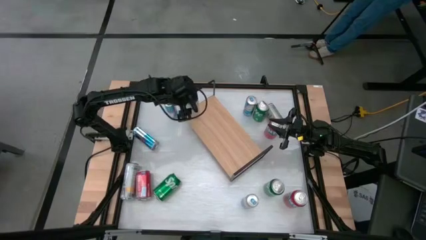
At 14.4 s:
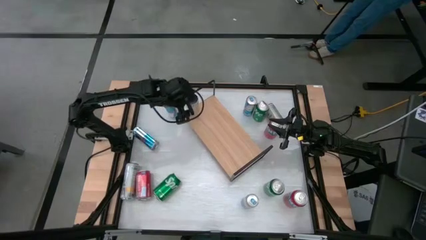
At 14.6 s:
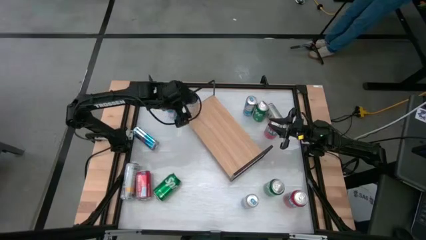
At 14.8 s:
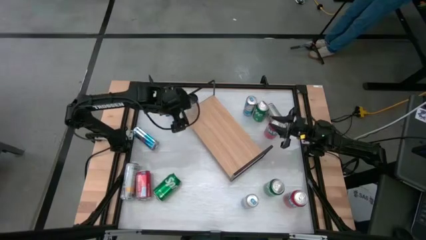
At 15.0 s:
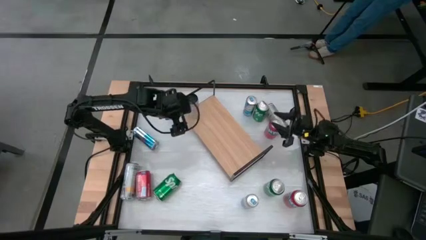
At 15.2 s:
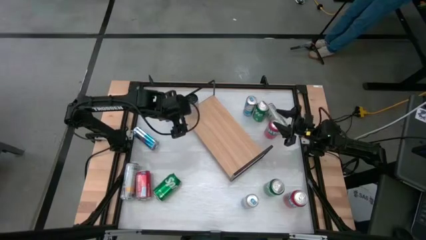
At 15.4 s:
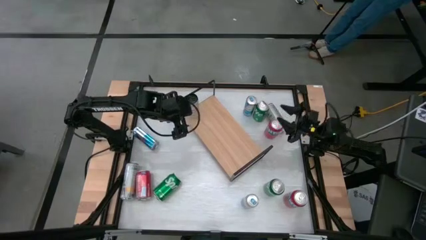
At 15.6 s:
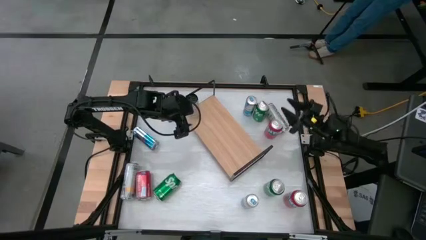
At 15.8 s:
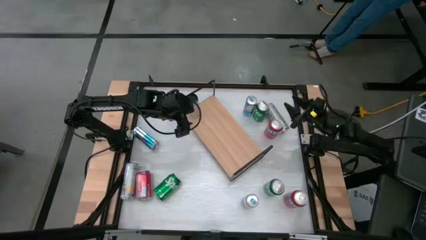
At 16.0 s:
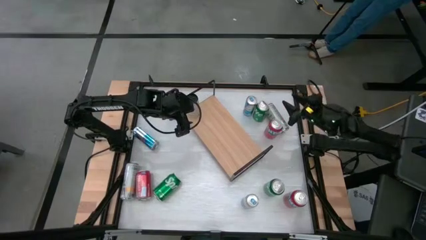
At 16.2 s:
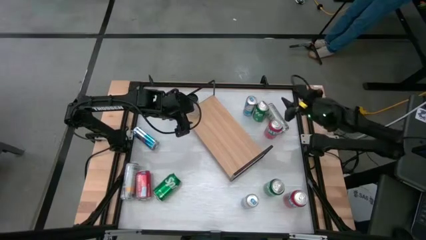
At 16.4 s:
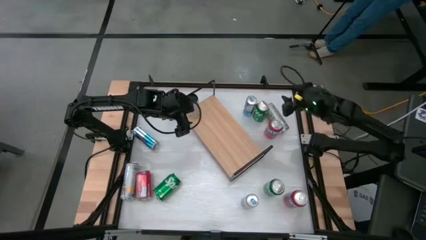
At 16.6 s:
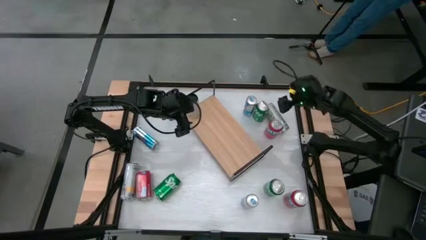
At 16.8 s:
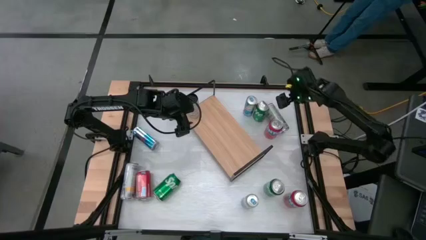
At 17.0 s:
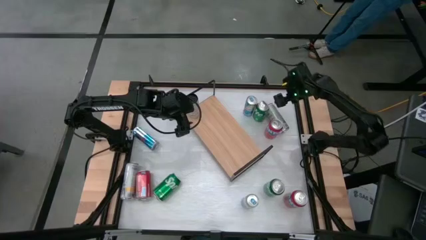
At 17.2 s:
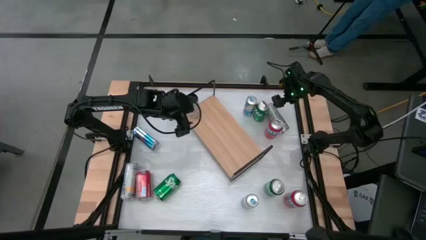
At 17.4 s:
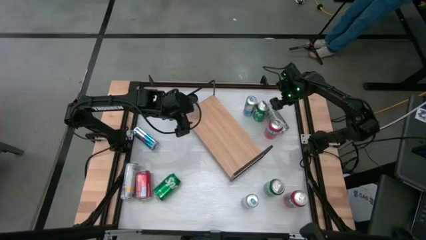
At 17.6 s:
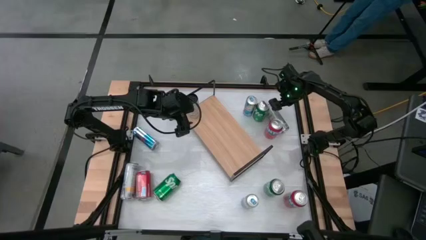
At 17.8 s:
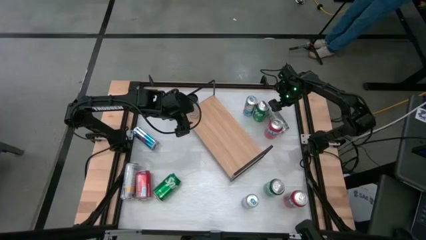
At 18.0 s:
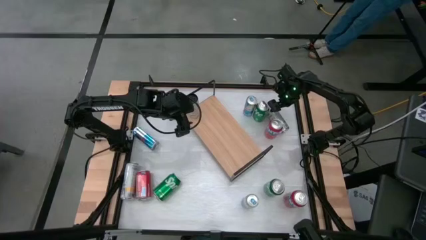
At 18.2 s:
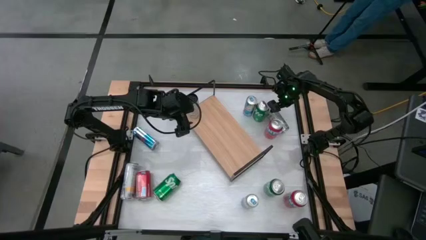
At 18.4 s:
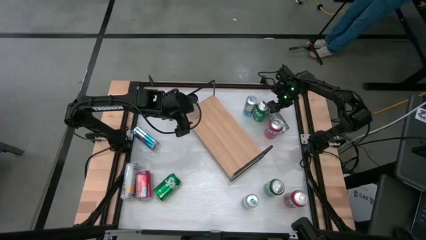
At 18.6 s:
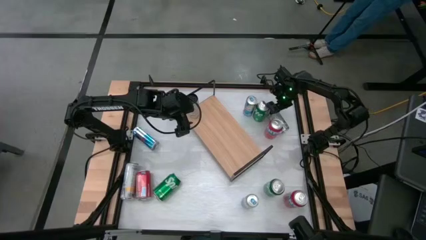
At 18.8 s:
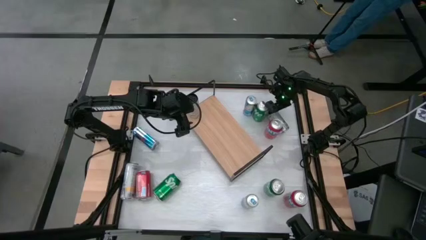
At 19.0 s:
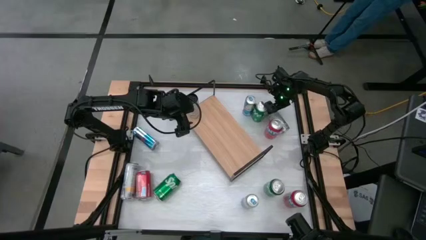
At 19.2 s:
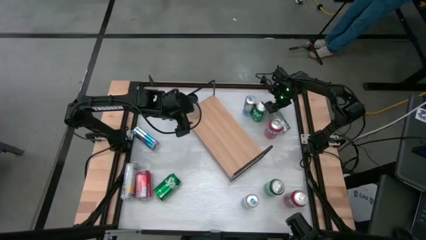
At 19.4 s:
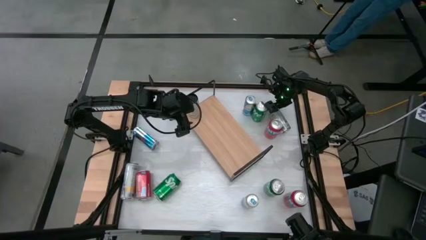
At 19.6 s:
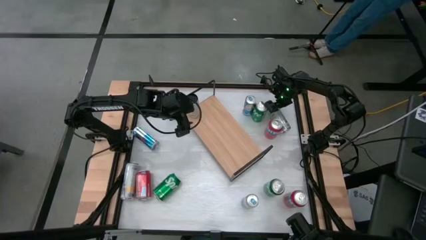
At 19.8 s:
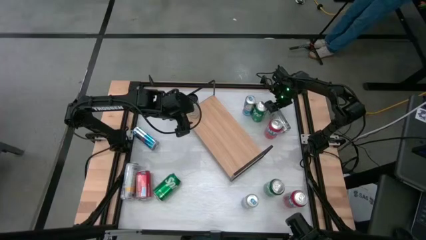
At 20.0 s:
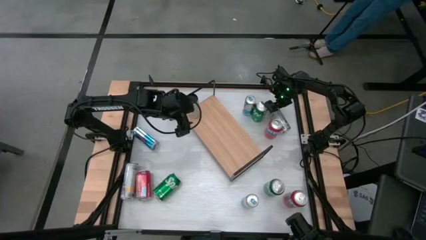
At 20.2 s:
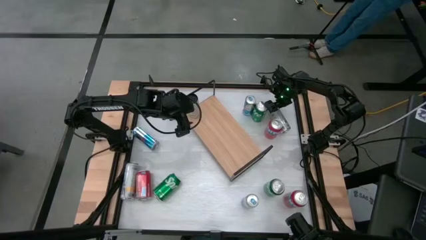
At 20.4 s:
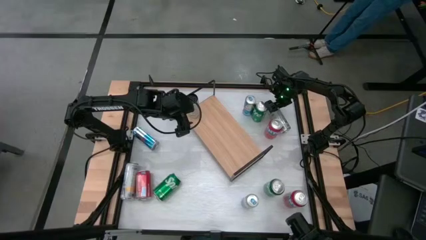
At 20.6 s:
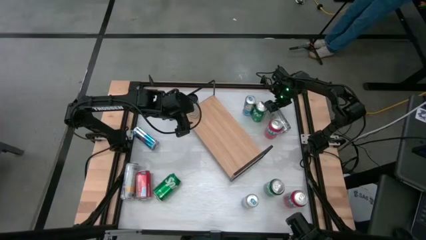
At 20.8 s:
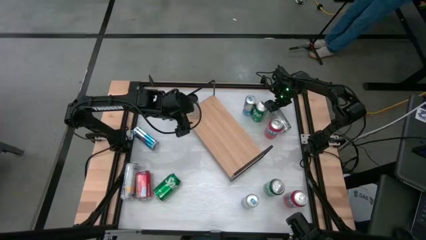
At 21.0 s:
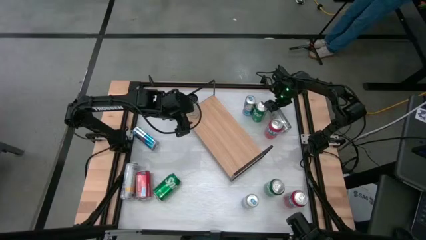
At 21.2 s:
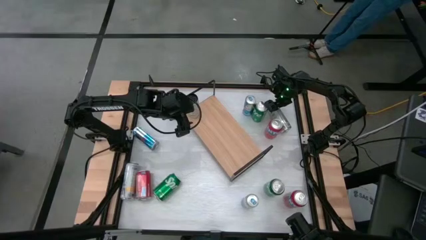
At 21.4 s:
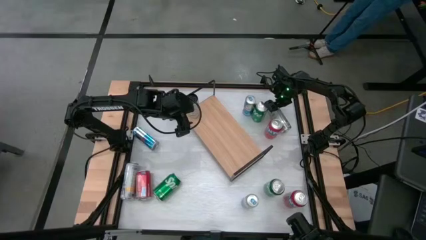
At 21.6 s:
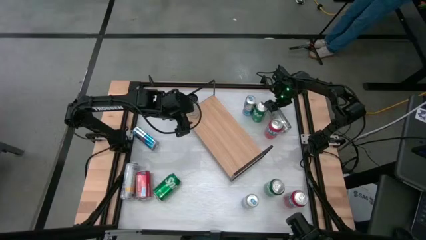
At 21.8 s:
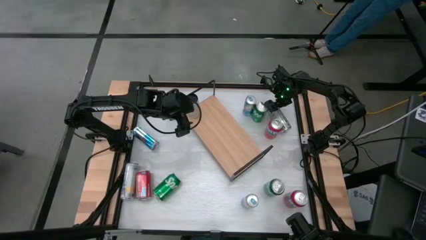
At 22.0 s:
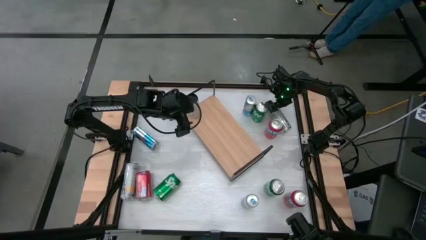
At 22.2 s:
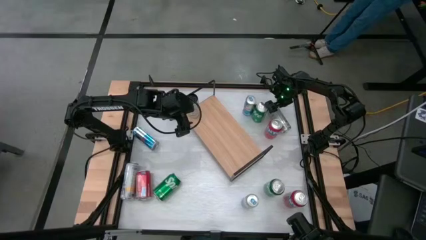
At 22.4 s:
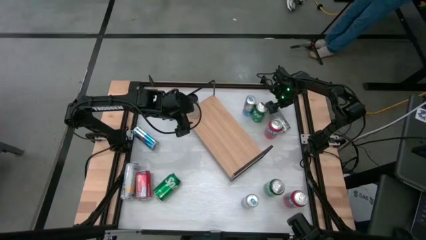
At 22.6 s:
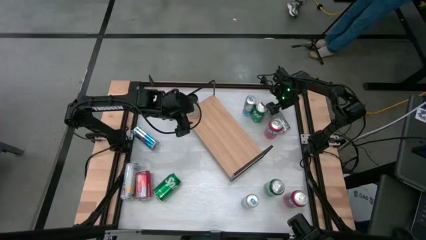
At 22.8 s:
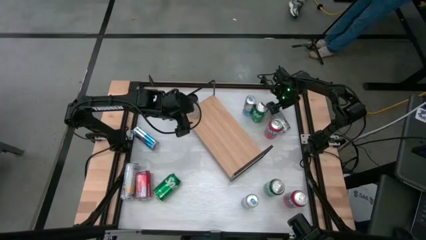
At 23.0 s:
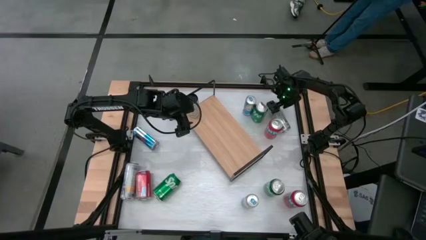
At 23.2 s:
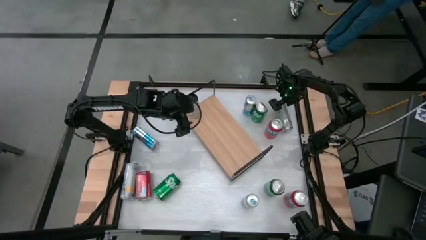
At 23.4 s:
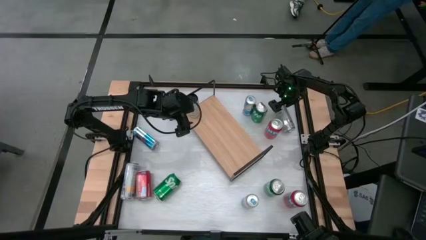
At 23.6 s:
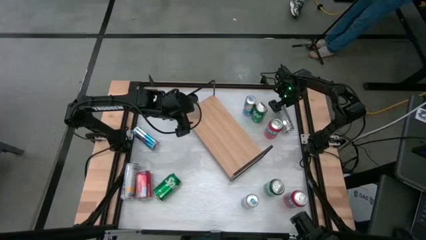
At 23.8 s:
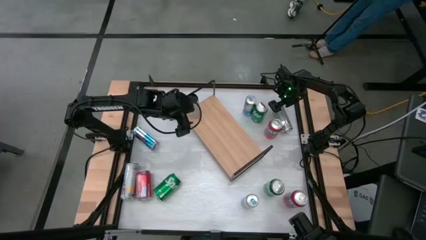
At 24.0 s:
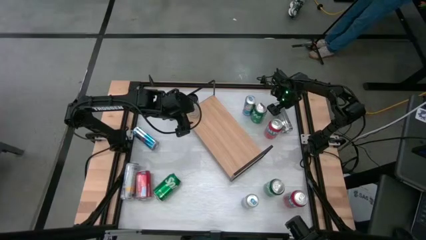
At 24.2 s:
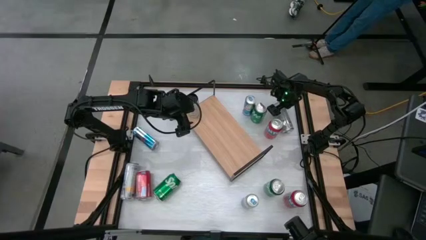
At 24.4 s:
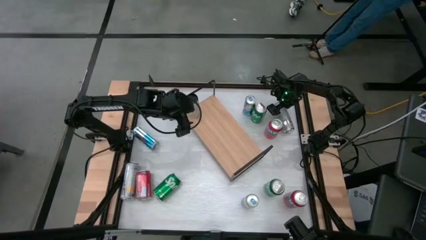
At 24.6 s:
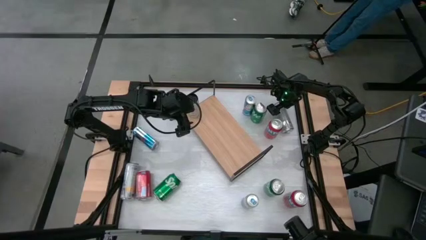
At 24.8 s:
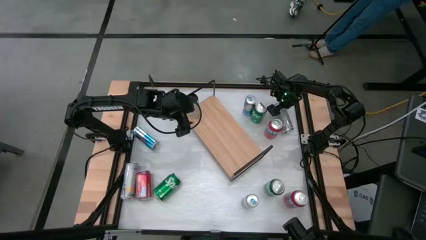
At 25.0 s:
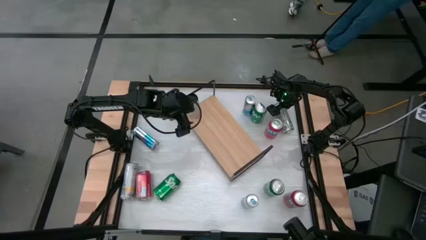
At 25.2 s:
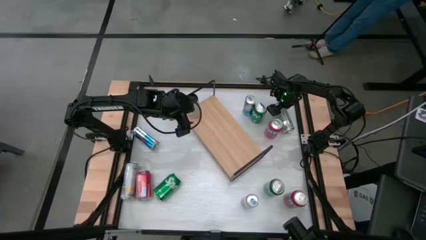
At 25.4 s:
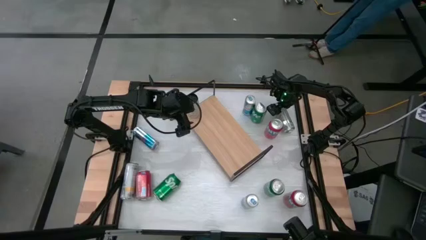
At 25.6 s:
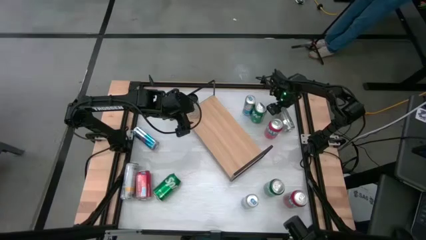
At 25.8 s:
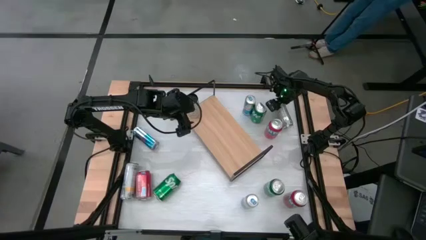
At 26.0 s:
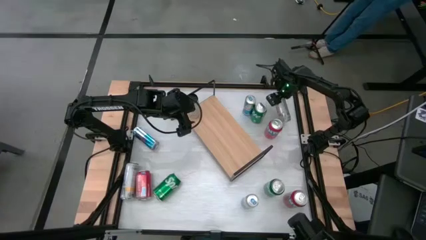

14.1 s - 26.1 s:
Task: Place canned beverage on shelf
Put the top white yellow soda can on the shelf aligned with the other white yellow soda can
